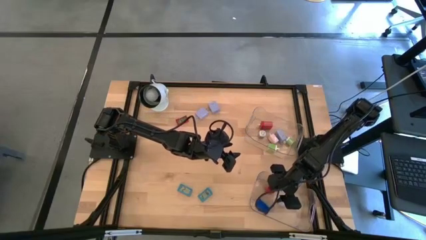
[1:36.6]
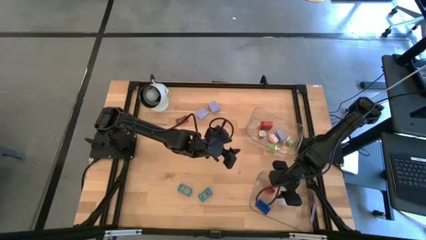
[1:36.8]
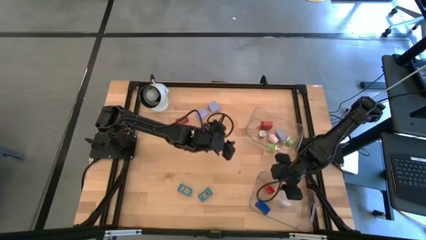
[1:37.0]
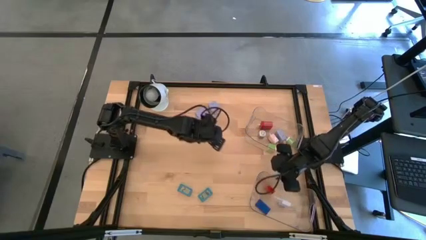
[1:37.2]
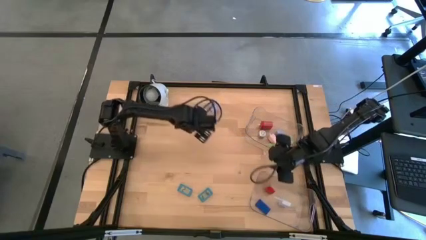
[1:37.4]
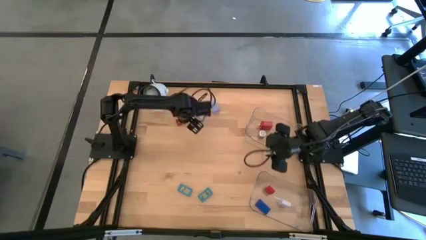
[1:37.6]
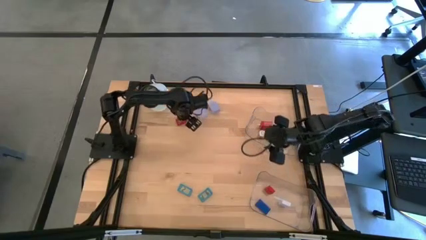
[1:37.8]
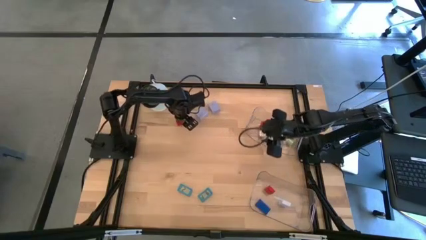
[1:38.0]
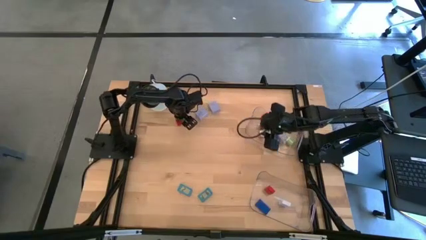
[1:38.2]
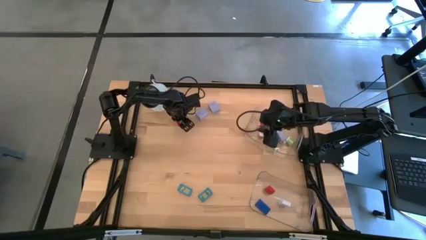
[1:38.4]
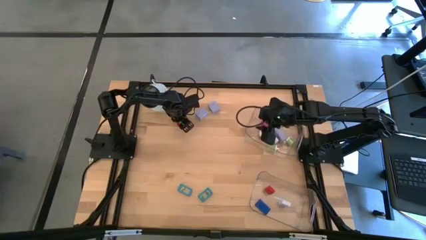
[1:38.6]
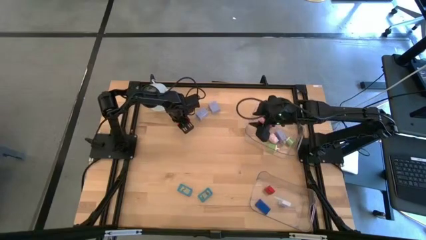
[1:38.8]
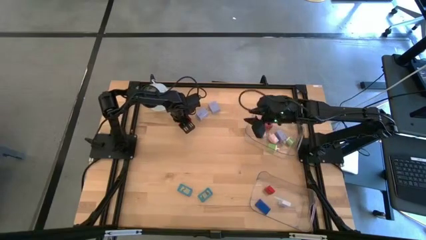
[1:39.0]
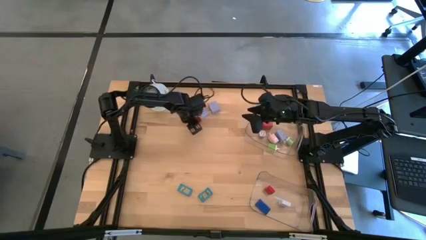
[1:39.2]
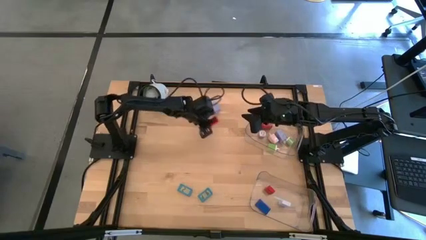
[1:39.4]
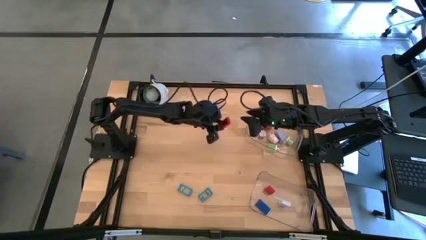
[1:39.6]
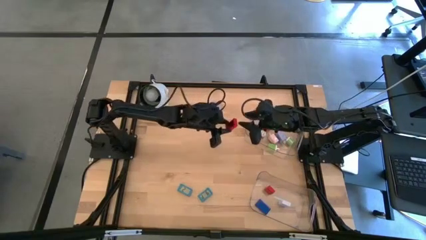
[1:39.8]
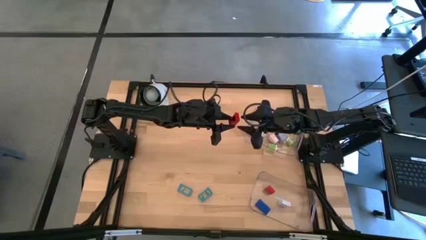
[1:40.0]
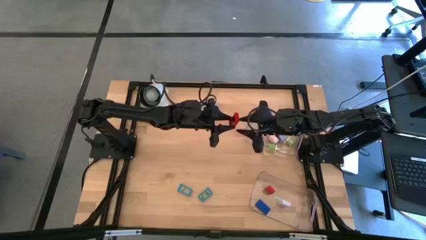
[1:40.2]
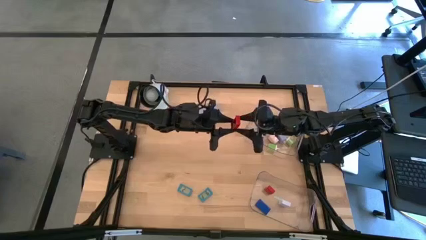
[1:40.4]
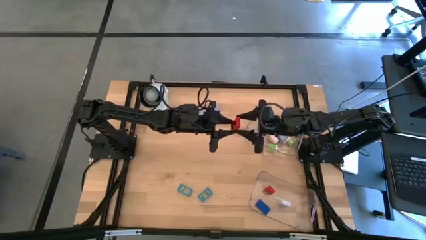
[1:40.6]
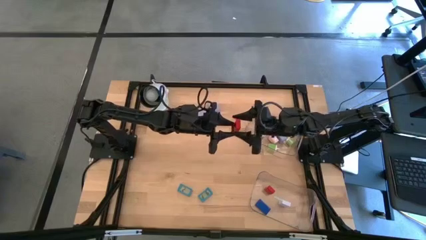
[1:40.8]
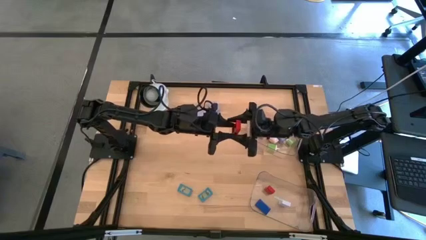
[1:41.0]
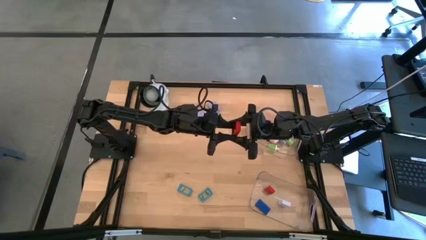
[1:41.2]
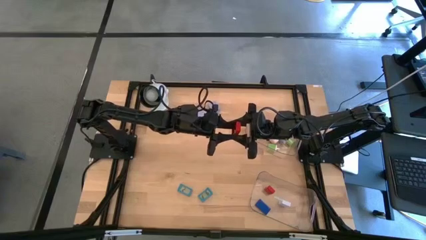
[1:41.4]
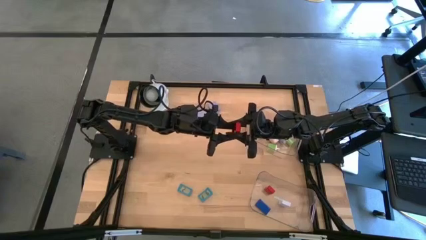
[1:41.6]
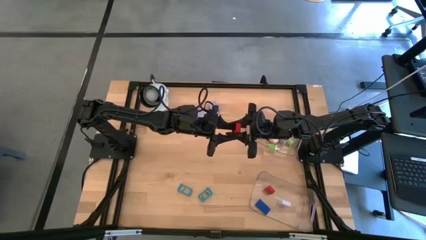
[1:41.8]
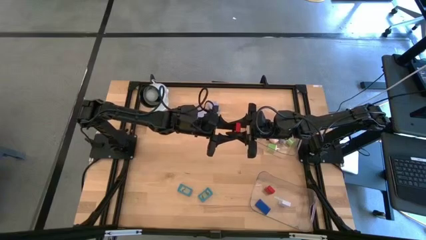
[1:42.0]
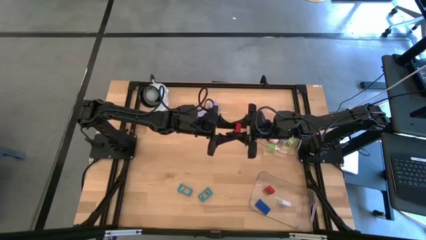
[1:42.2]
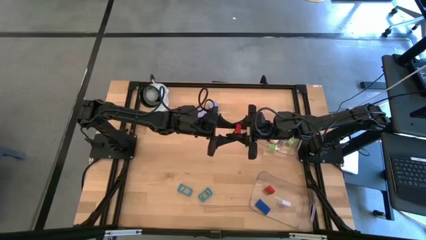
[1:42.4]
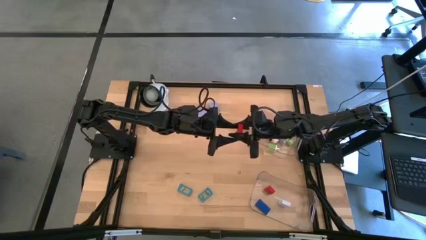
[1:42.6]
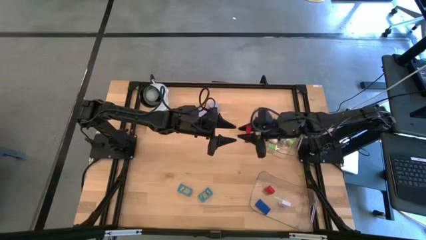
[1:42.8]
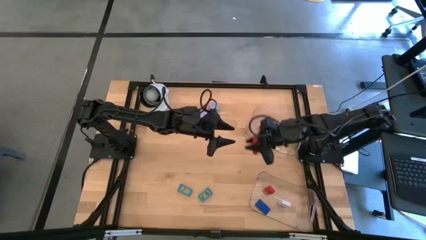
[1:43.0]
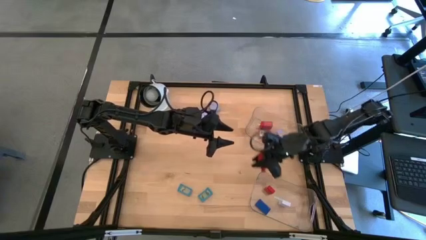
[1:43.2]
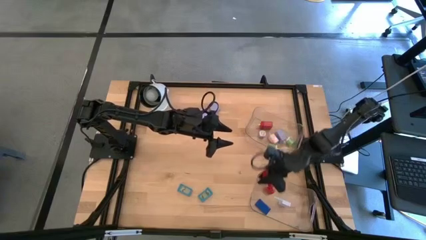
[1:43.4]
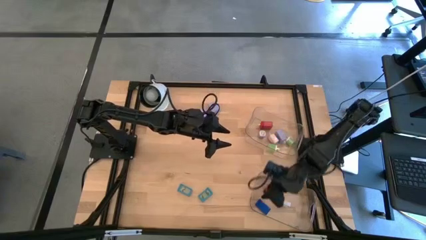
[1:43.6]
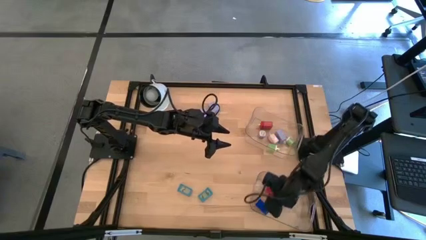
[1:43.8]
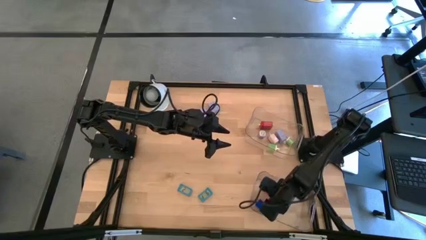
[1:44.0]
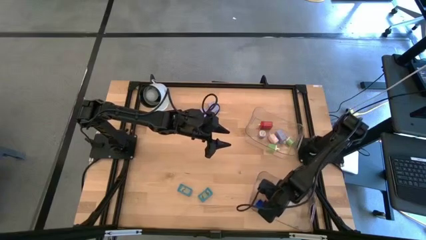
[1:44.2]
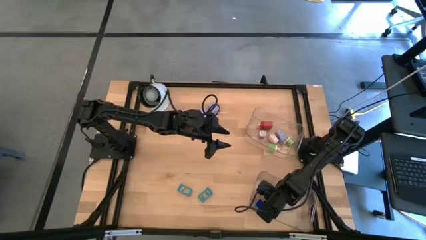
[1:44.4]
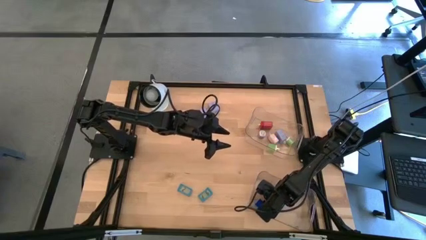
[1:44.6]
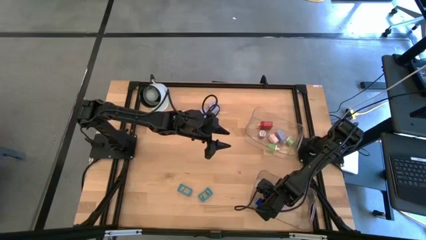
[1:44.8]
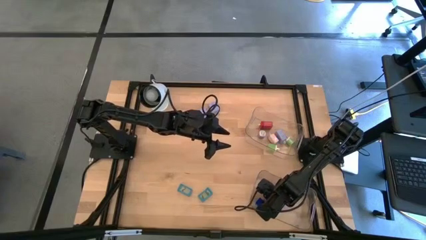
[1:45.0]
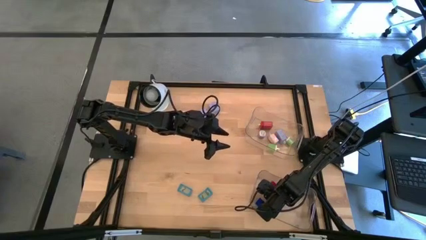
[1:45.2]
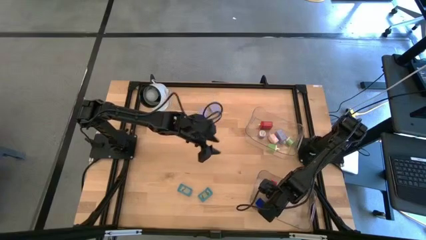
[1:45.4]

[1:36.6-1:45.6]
Task: Pick & Place Office items
Put the red digital clock into the bottom transparent bin

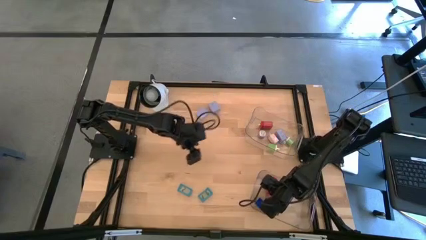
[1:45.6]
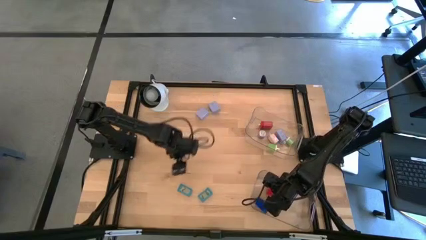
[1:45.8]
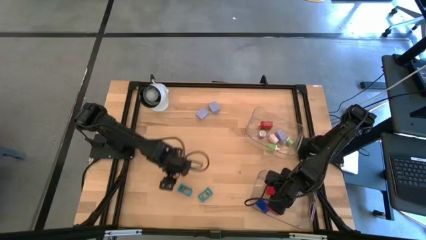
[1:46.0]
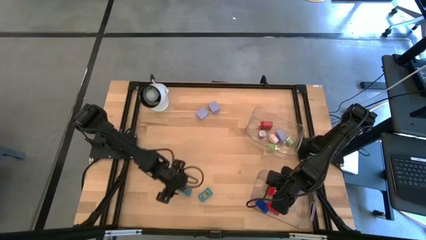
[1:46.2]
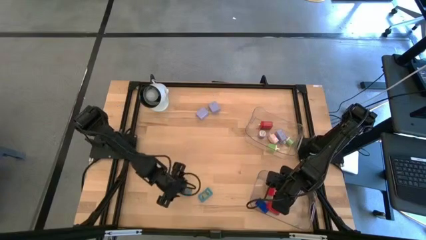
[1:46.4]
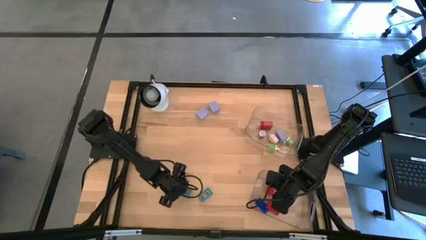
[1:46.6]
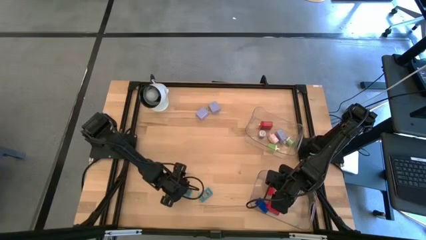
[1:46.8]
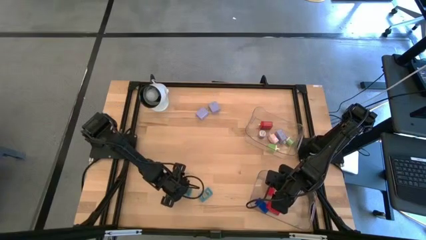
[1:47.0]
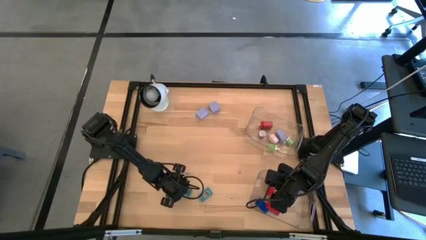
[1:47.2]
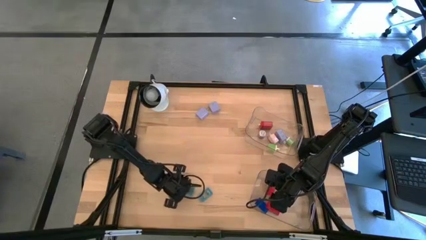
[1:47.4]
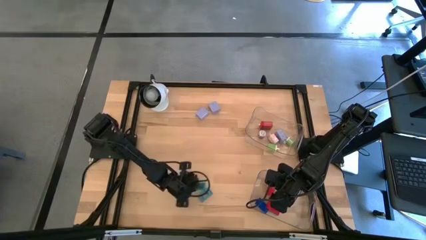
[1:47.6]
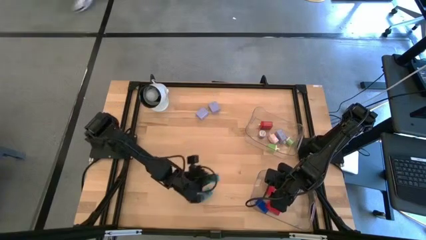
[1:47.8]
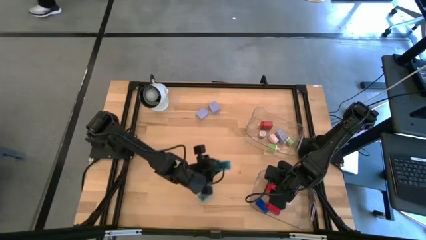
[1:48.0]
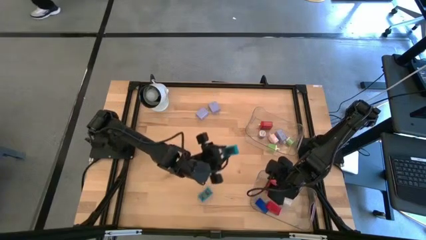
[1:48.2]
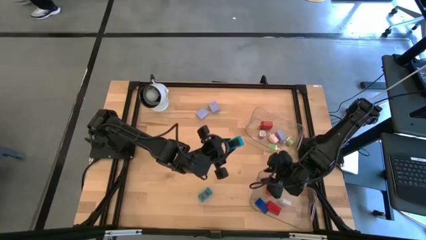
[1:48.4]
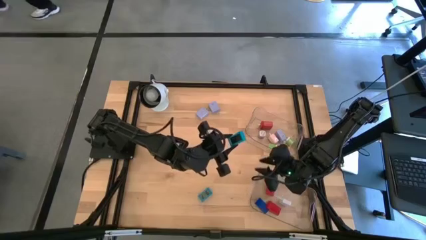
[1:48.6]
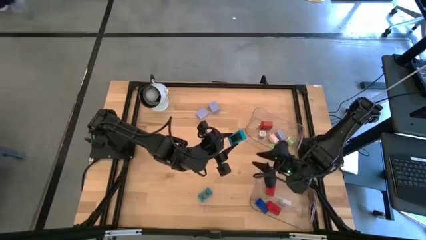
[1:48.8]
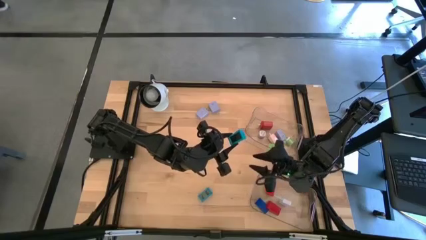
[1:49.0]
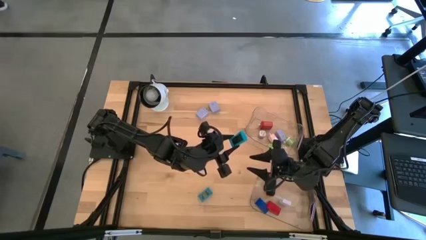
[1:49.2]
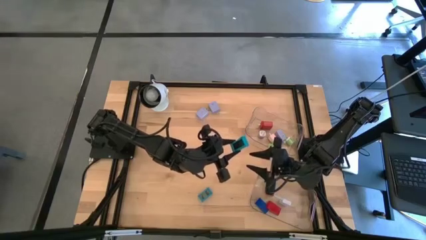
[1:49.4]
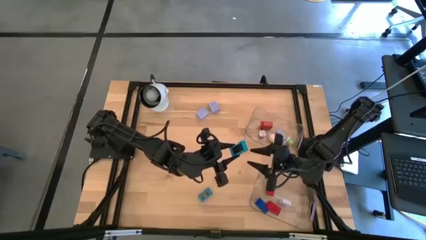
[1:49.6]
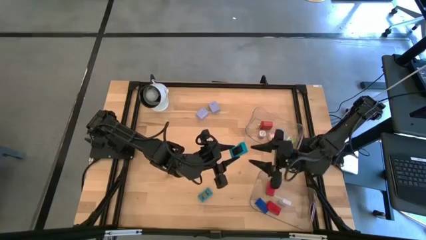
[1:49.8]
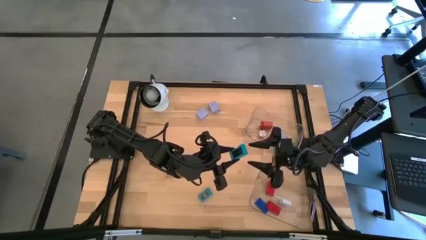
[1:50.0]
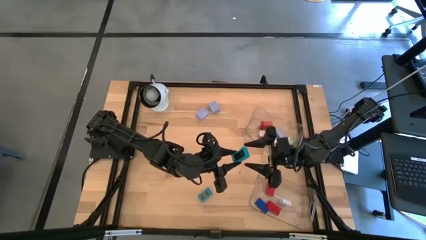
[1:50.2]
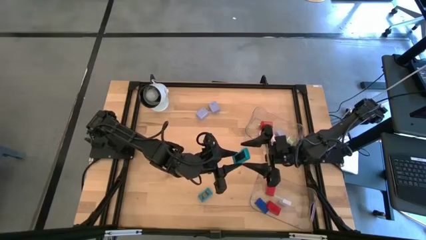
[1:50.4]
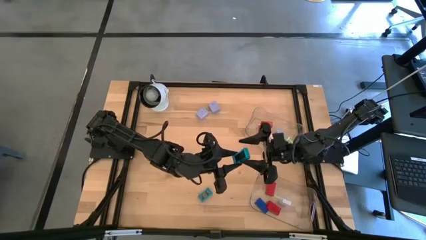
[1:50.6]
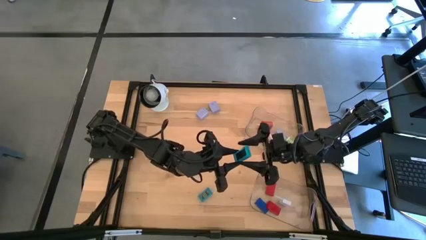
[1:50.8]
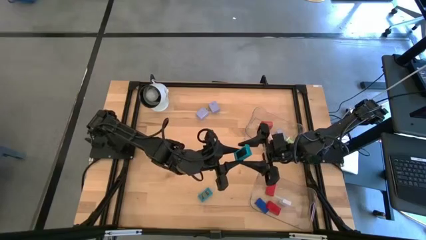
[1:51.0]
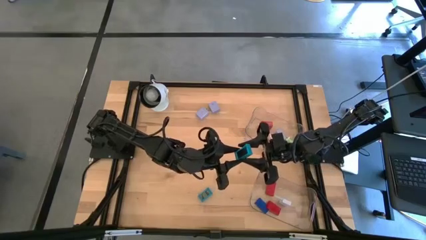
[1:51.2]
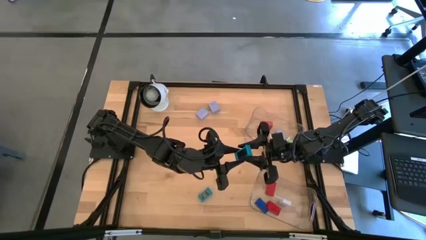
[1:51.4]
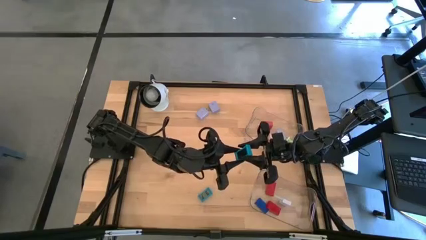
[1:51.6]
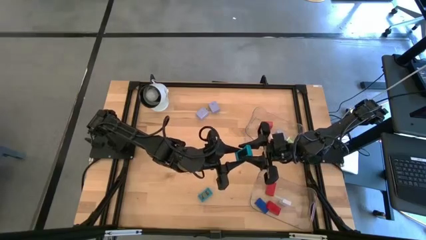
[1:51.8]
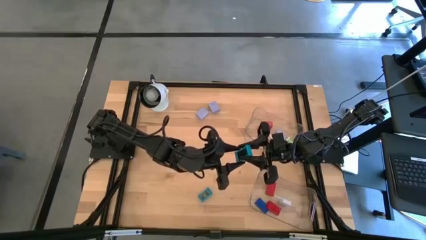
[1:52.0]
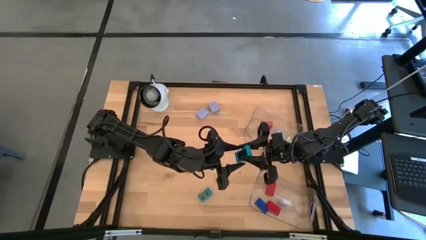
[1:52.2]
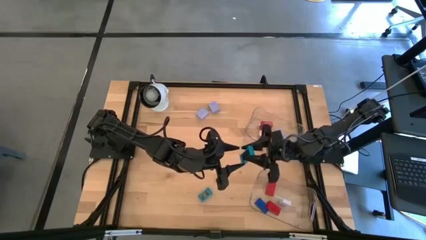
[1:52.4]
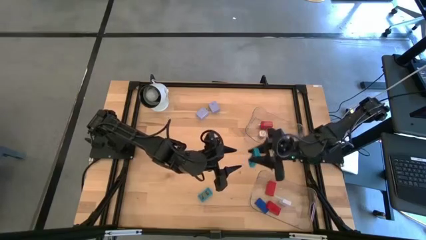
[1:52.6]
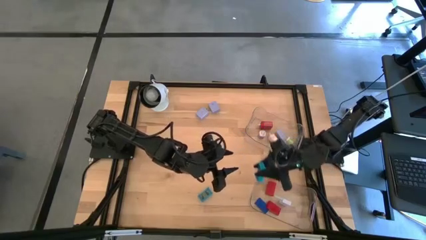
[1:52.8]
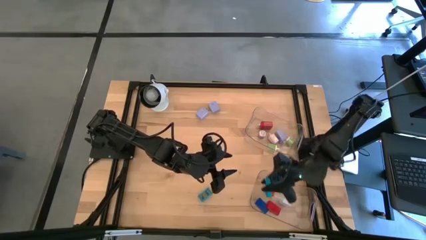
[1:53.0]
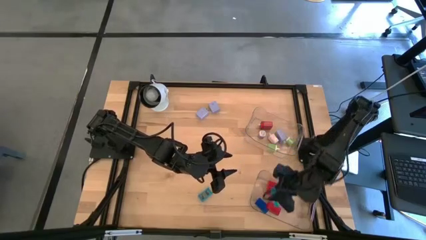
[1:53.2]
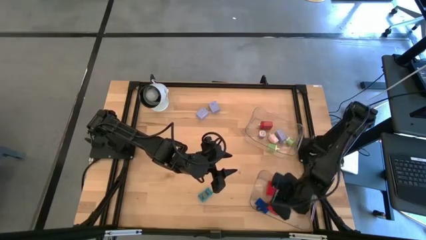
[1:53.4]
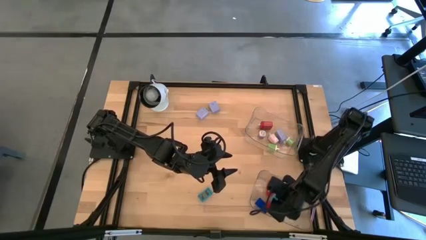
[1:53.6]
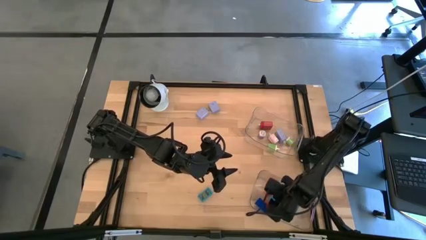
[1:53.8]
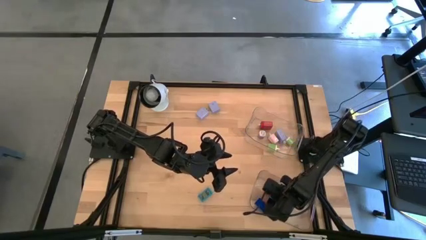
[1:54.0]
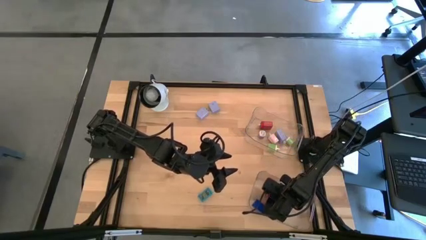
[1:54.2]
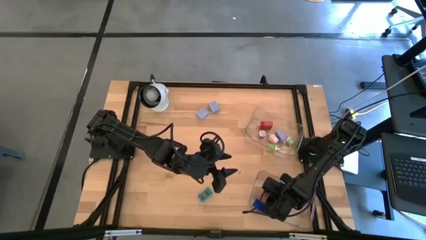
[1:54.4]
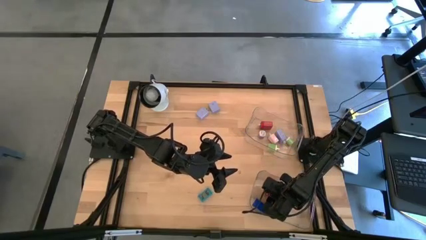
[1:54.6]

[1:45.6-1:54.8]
Put the left light blue digital clock into the bottom transparent bin
